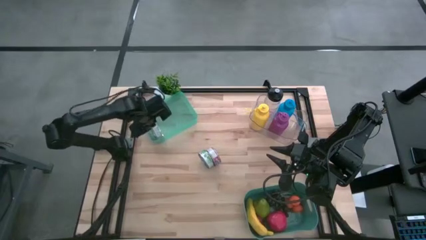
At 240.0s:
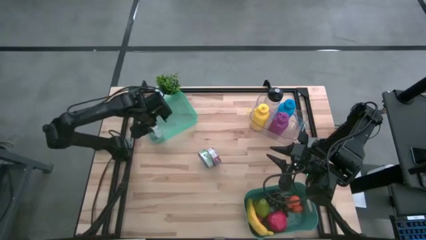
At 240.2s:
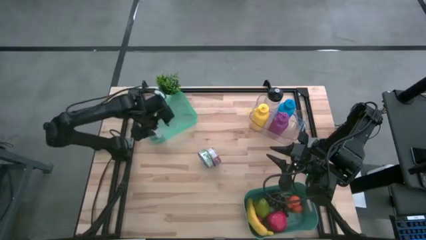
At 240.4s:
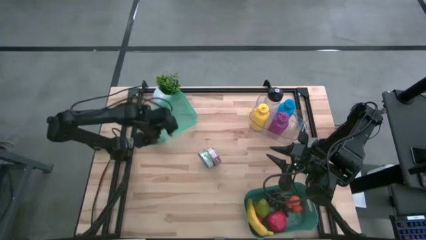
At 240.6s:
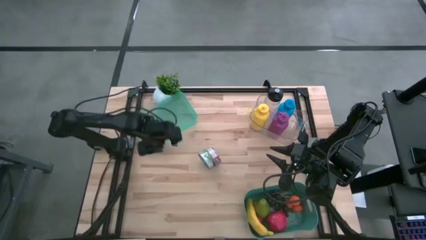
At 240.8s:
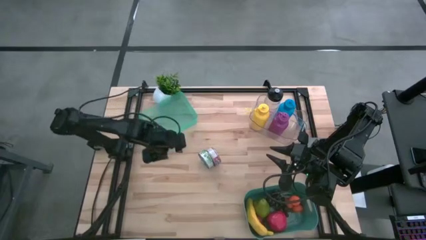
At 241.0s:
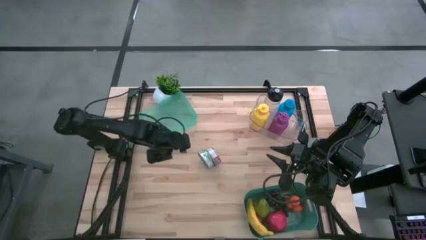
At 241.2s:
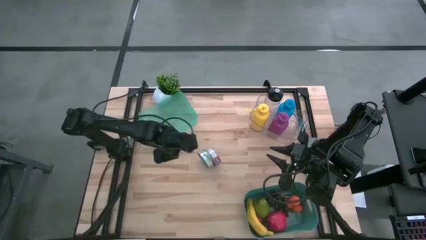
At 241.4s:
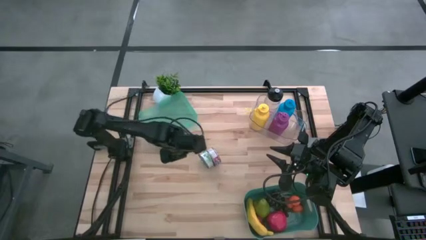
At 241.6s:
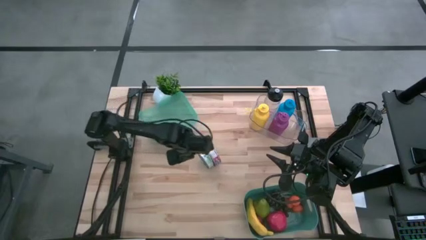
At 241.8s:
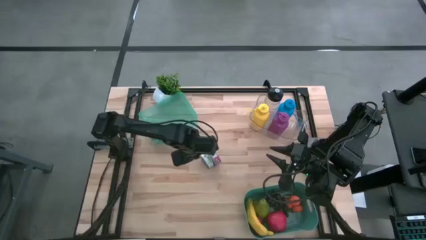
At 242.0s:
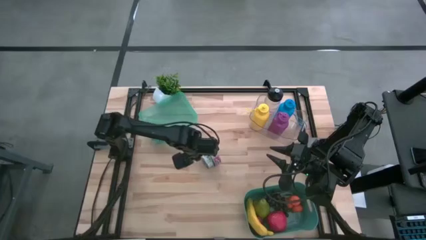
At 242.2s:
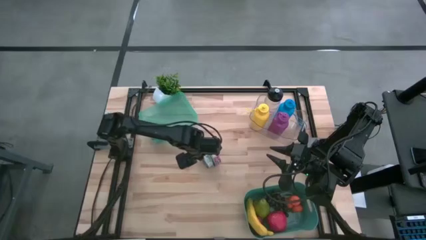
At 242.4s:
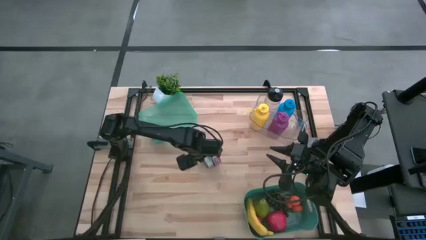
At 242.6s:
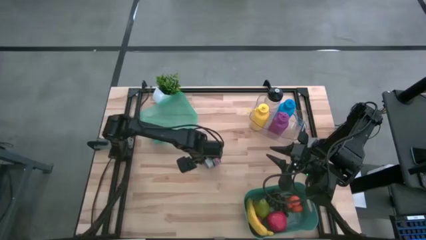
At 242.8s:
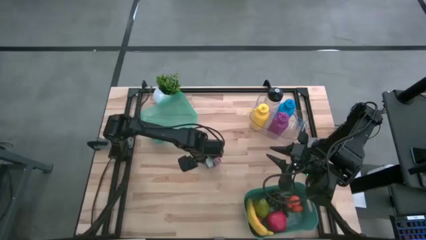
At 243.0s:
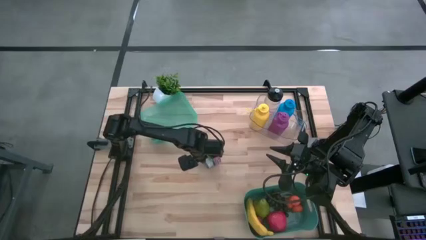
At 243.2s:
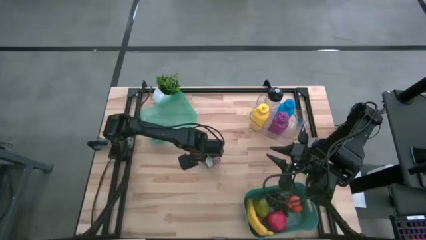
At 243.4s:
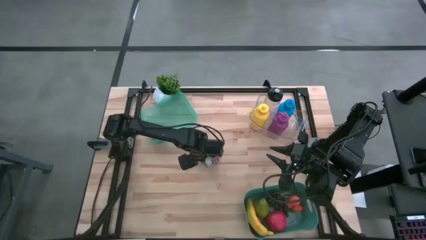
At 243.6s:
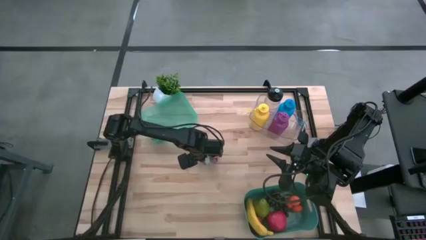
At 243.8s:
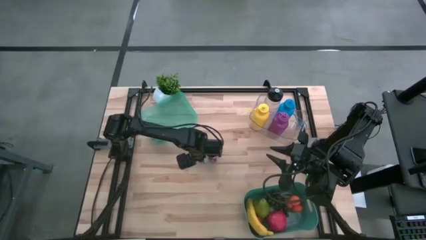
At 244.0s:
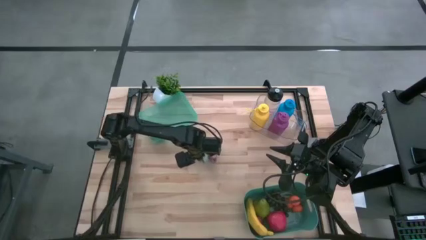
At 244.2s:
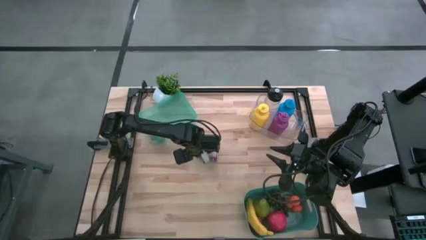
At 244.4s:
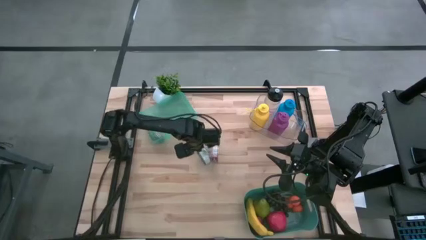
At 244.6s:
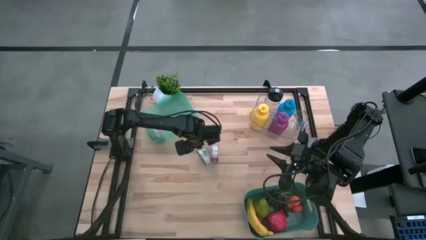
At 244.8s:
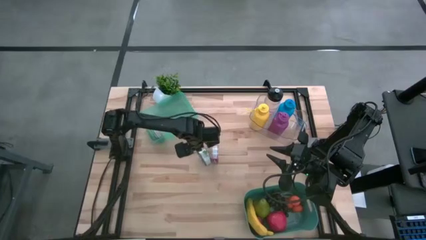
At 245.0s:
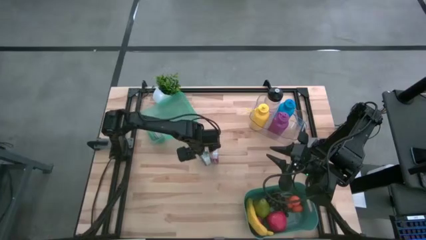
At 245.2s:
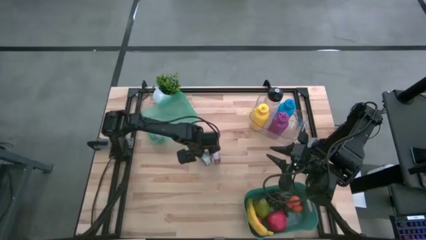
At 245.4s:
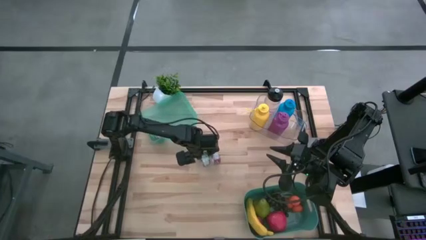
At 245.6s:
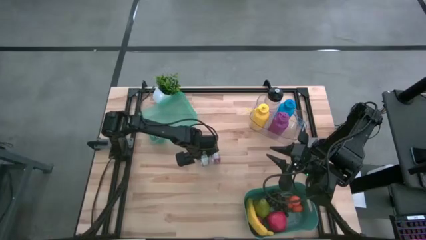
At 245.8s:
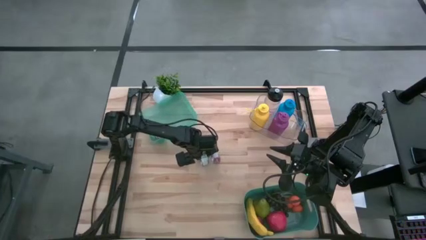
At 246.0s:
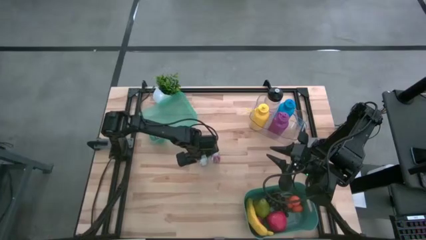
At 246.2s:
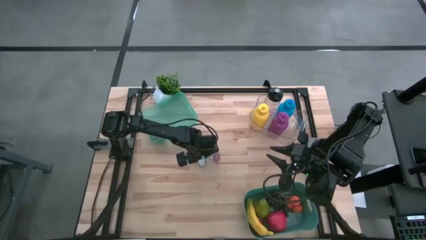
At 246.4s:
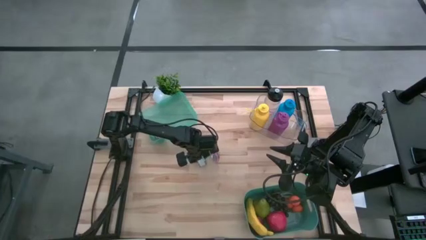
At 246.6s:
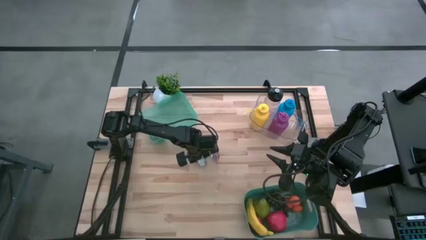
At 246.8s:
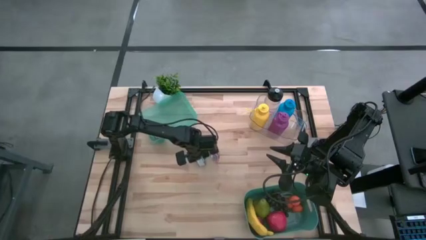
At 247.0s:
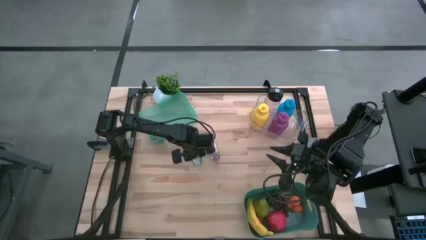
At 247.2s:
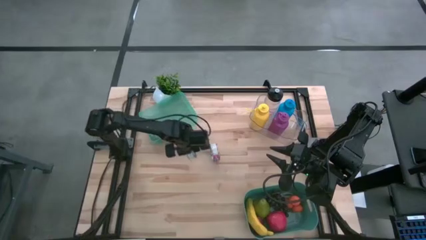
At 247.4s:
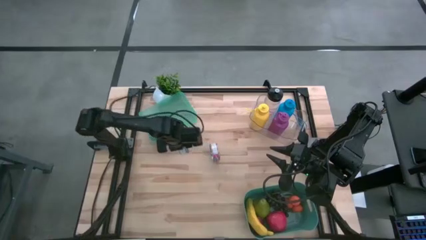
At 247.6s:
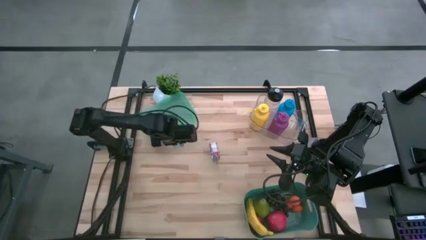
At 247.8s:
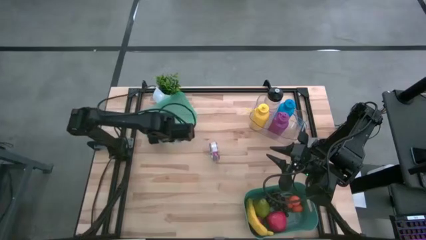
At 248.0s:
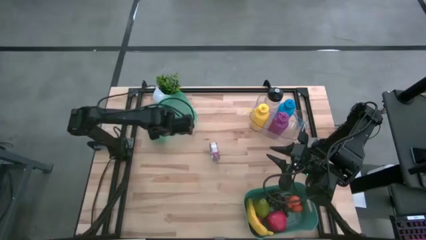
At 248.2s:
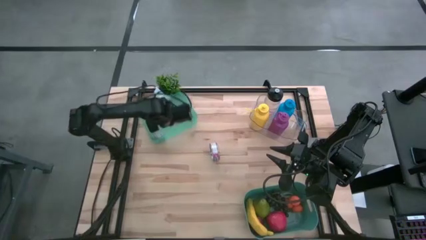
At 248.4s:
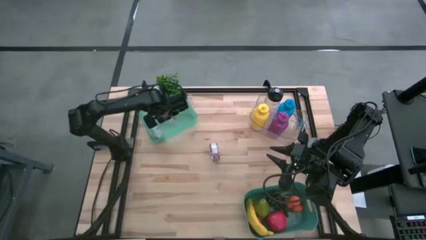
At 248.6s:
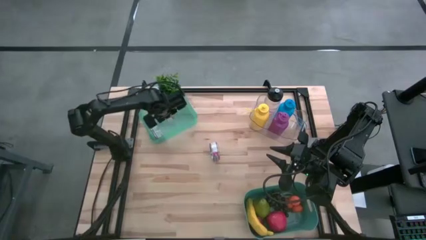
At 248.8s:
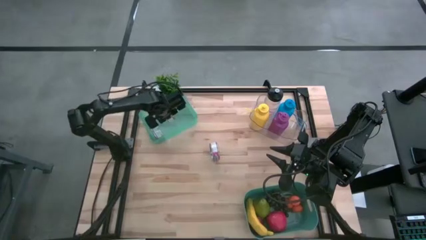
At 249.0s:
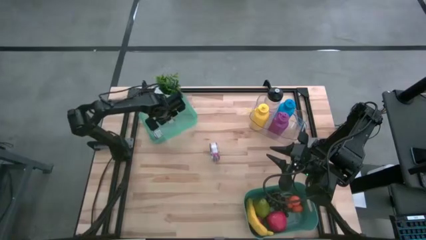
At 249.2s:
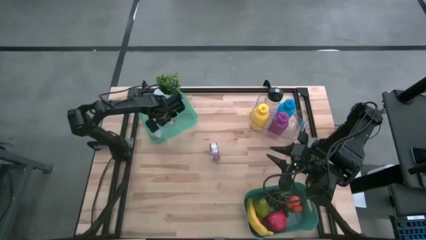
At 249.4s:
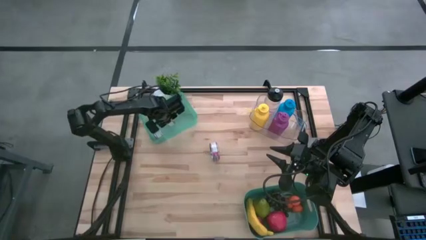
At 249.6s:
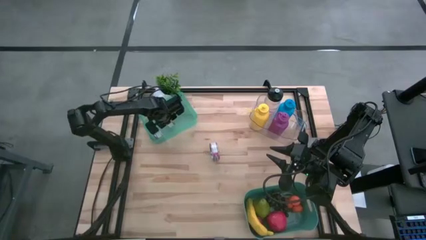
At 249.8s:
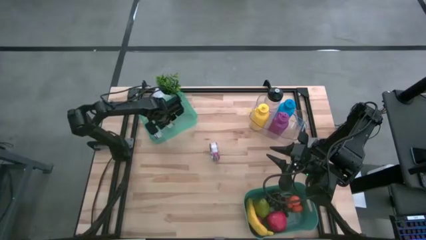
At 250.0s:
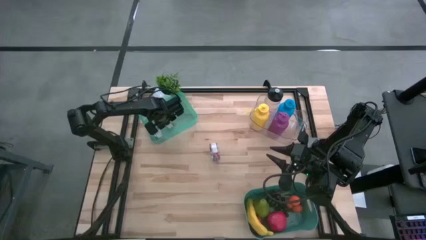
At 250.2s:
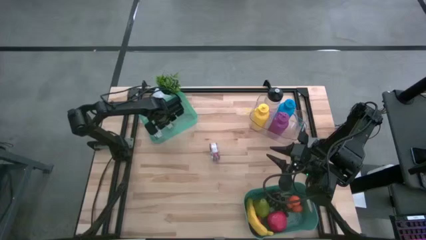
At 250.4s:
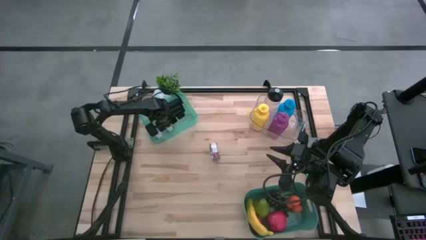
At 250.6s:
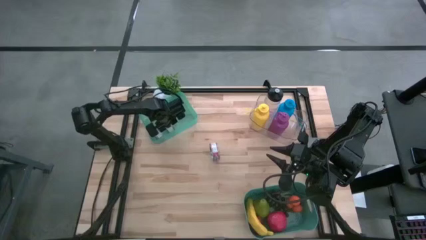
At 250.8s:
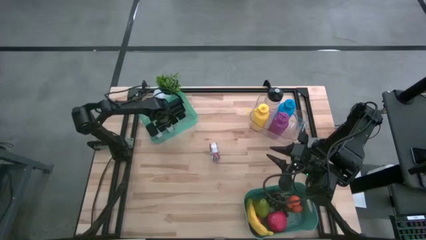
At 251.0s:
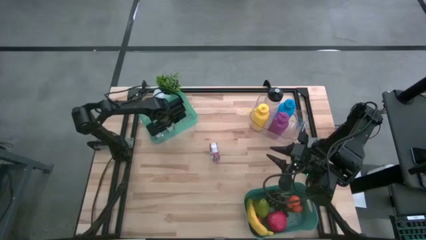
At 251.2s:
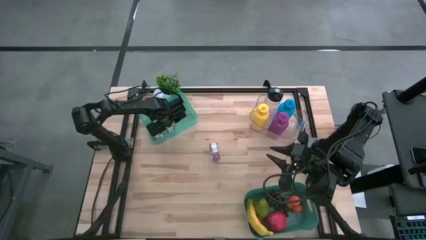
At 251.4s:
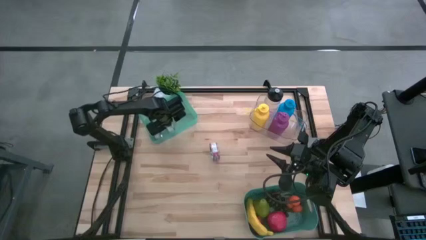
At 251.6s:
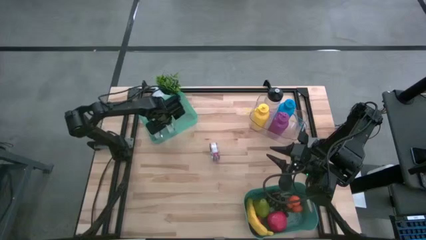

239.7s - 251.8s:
Task: Pick & Place Food Item
Put the green tuna can into the blue transparent bin

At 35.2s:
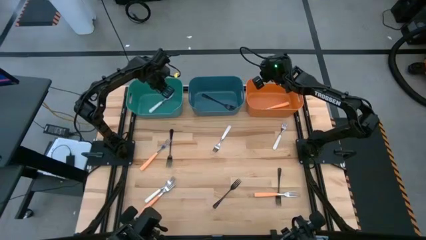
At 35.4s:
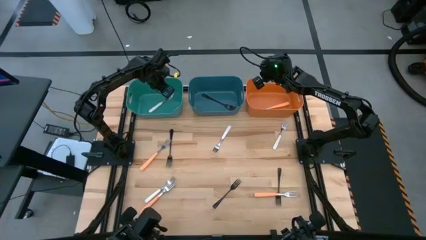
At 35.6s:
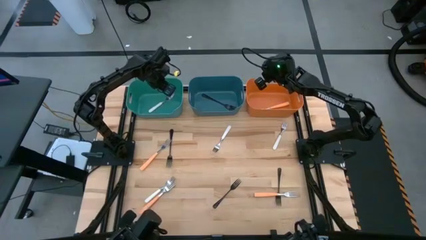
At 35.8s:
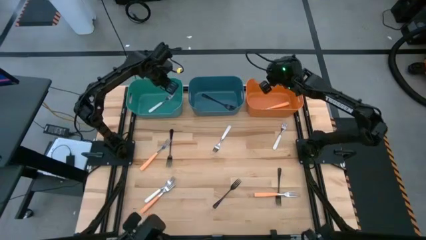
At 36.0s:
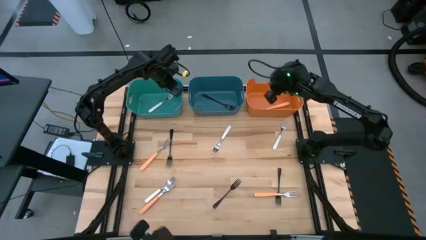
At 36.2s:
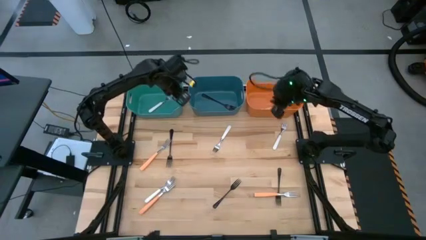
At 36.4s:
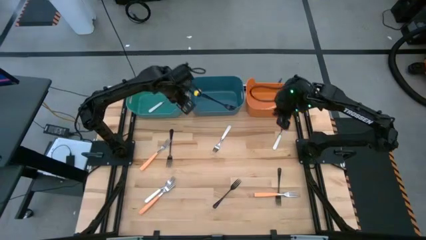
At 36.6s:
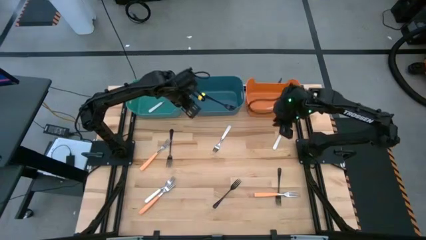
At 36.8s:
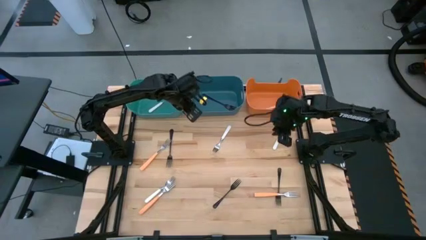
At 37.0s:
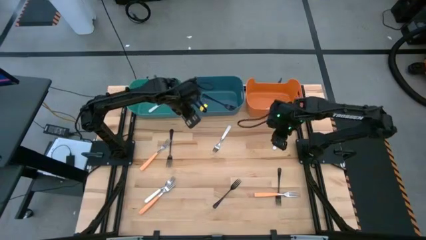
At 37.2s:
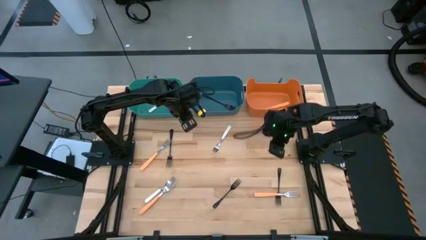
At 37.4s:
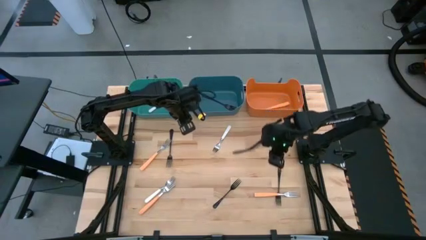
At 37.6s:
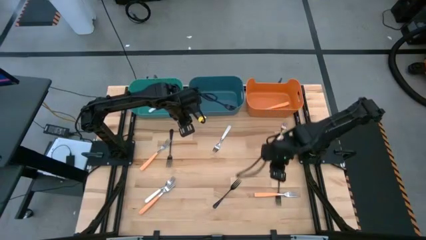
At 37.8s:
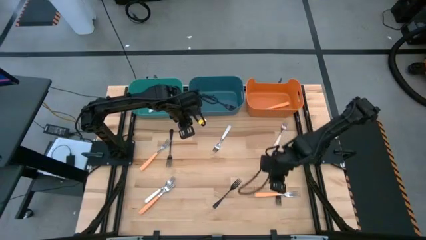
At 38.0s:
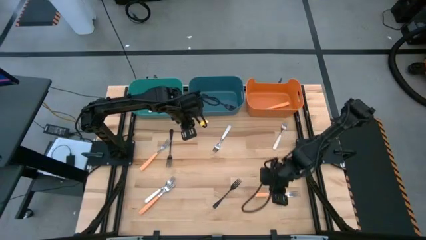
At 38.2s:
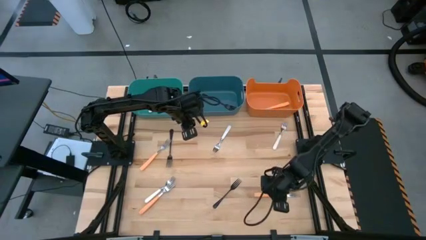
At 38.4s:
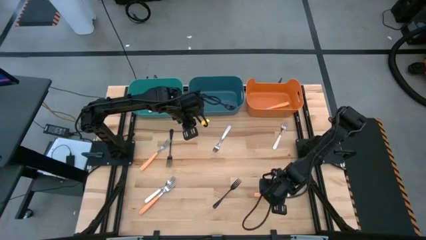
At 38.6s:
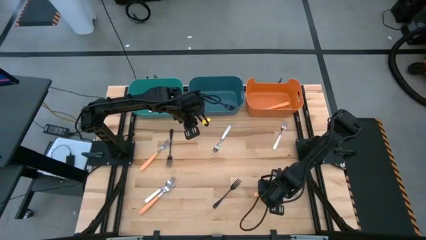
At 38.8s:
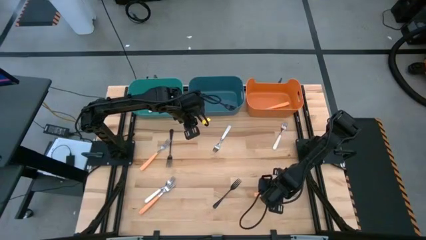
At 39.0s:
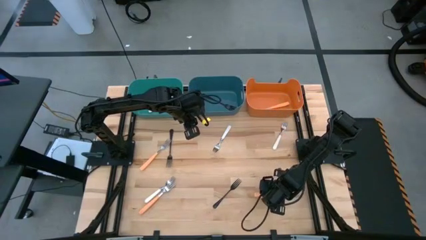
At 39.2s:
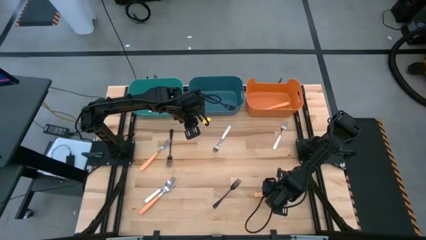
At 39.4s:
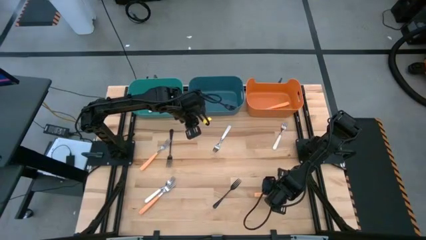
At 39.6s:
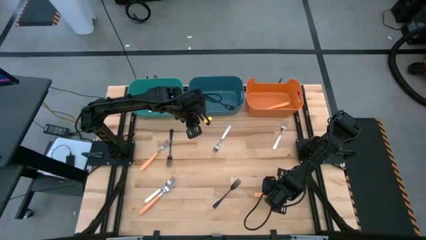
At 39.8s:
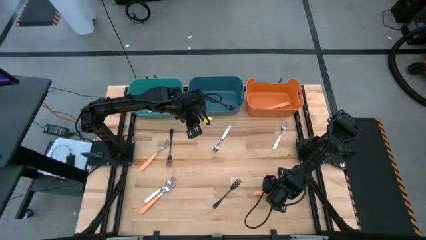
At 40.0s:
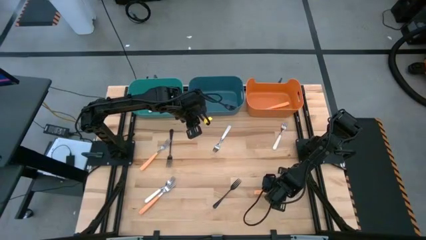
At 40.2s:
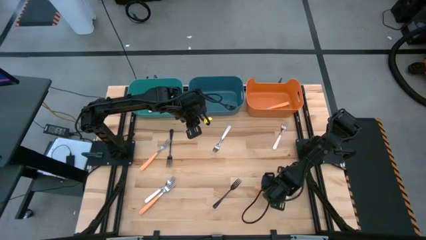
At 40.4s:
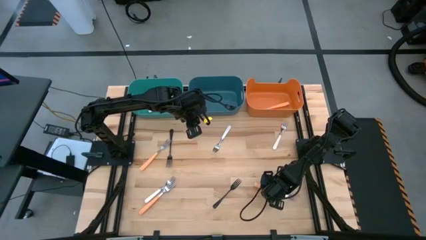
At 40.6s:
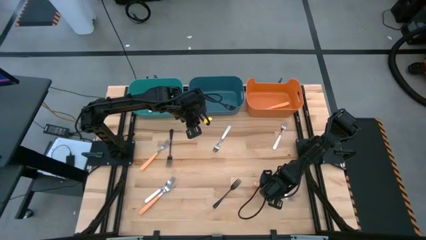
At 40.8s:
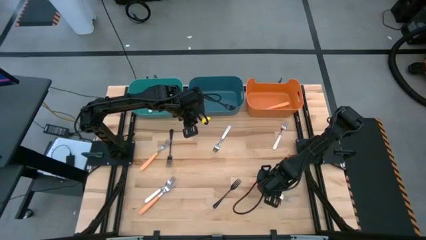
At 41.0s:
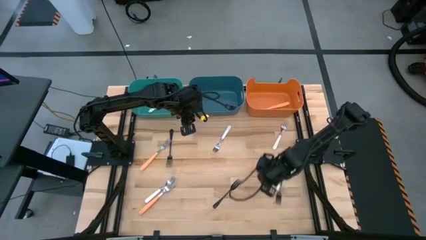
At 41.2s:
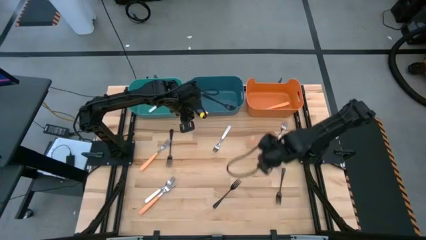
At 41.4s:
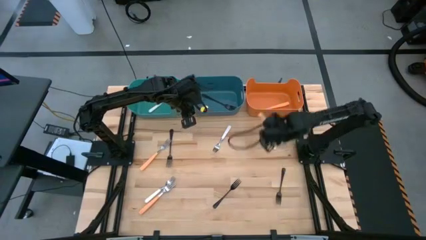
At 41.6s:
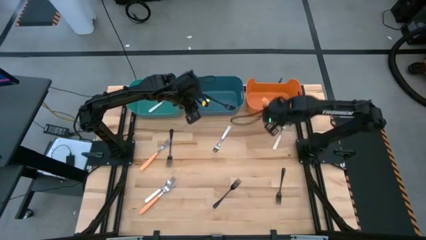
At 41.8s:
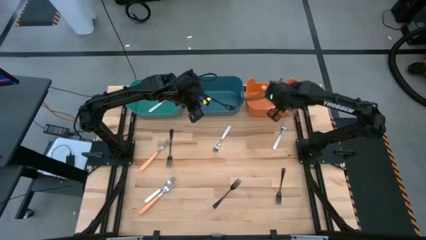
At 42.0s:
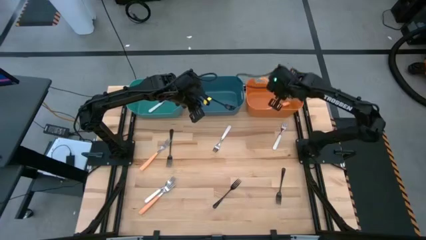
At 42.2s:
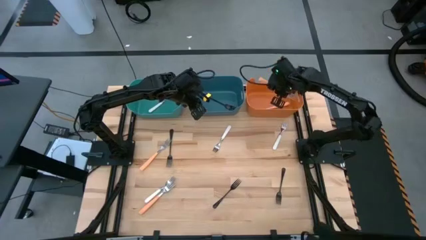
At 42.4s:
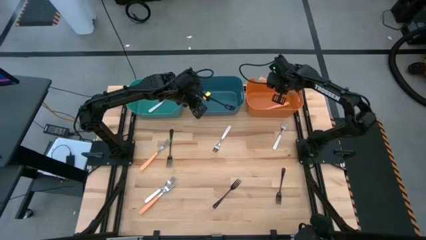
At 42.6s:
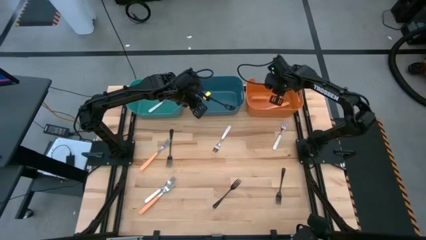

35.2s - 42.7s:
Task: Sort silverware by color (type)
Put the yellow fork into the orange bin
